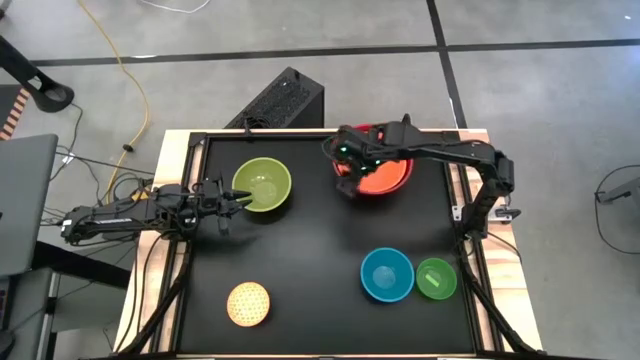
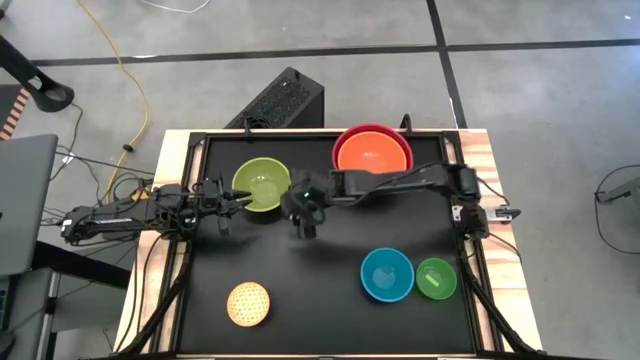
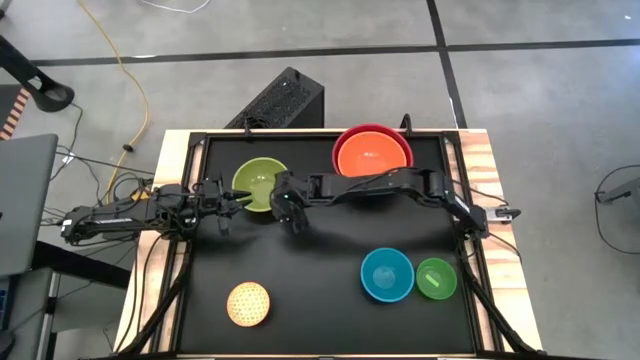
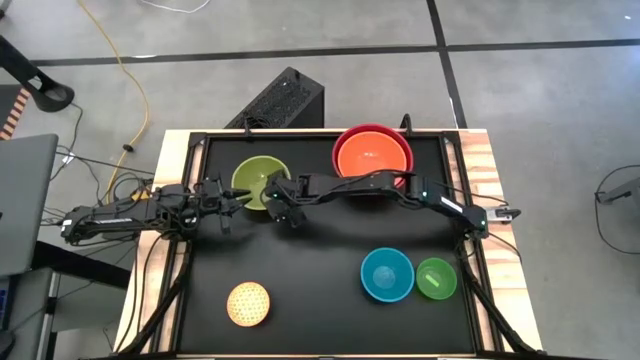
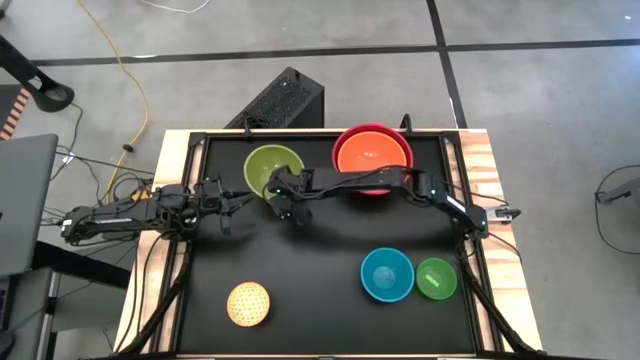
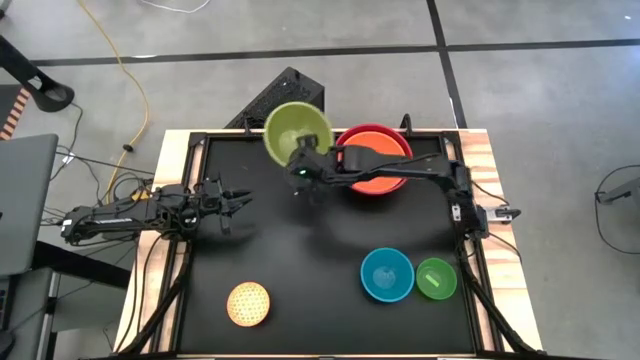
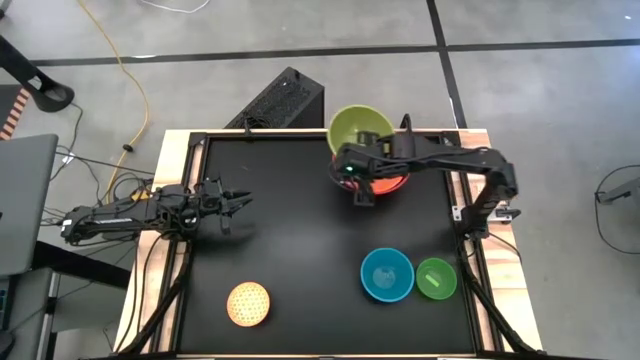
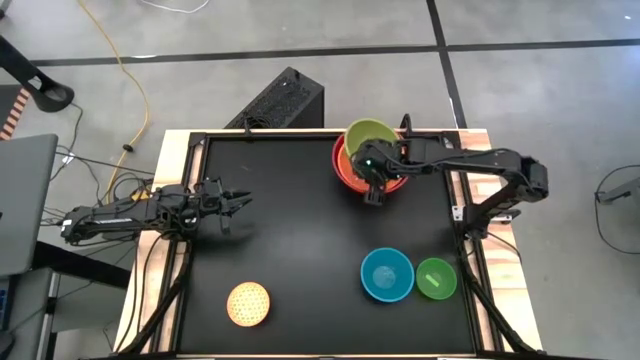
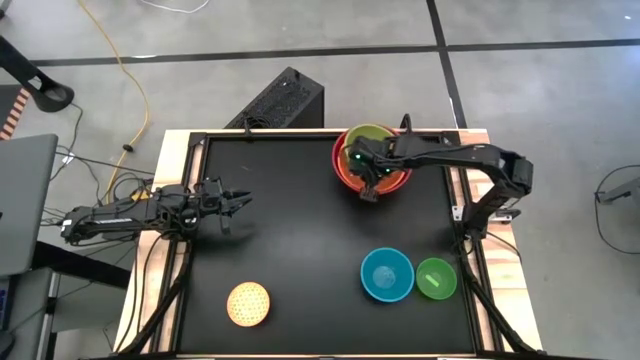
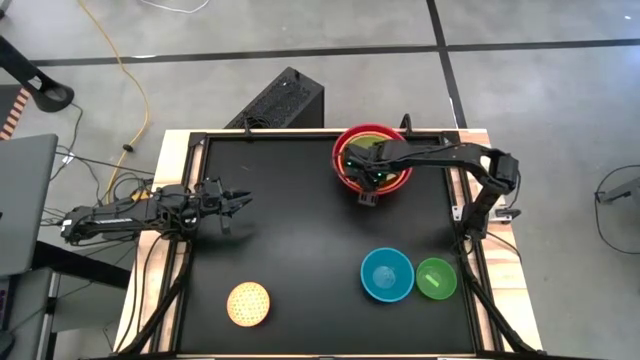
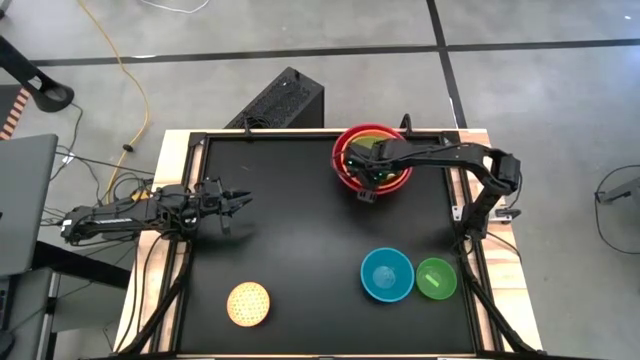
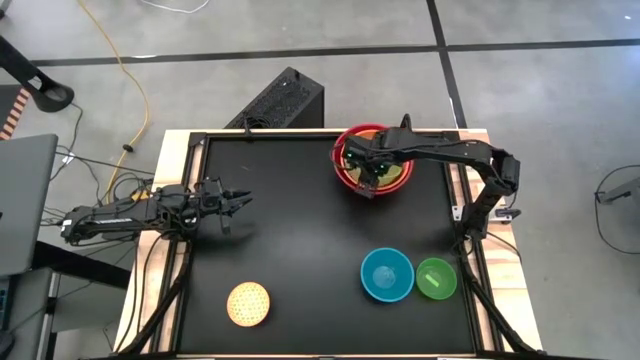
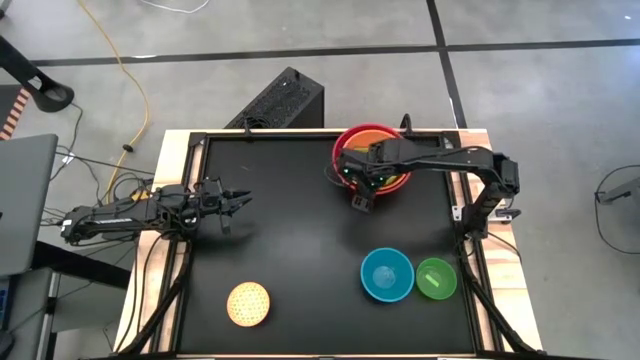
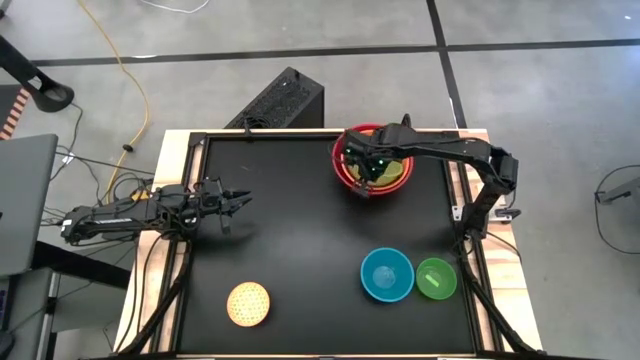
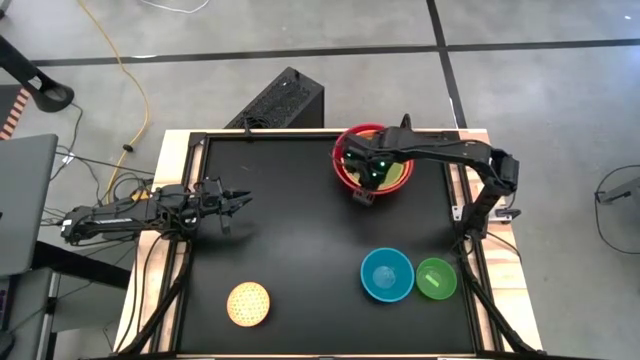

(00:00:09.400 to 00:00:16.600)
Stack the light green bowl on top of the orange bowl

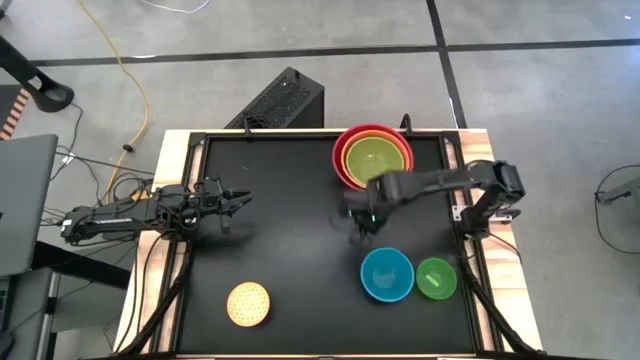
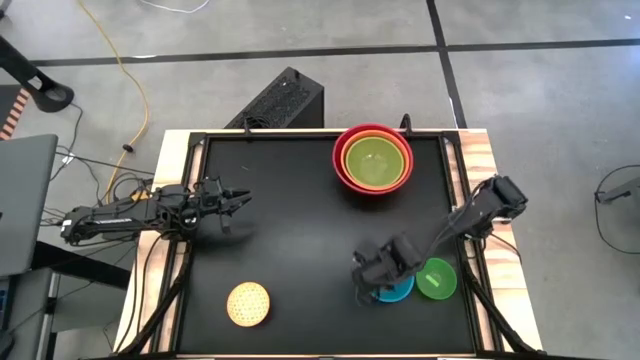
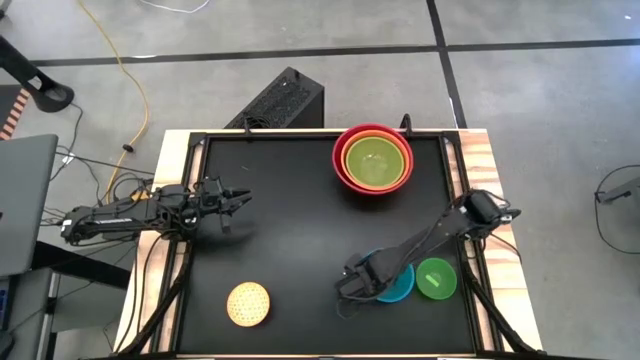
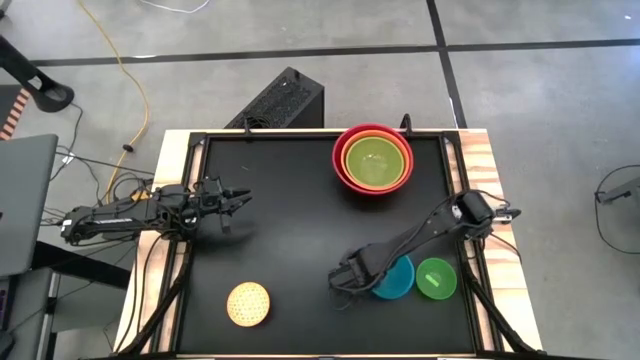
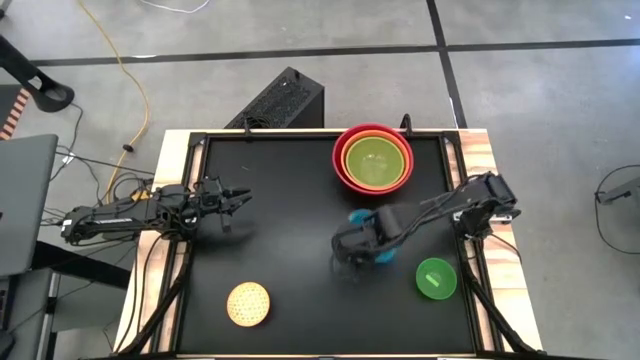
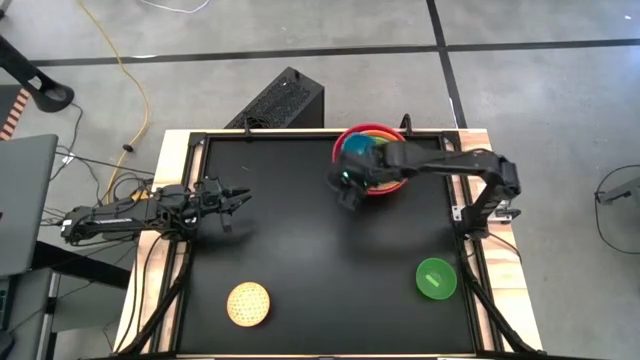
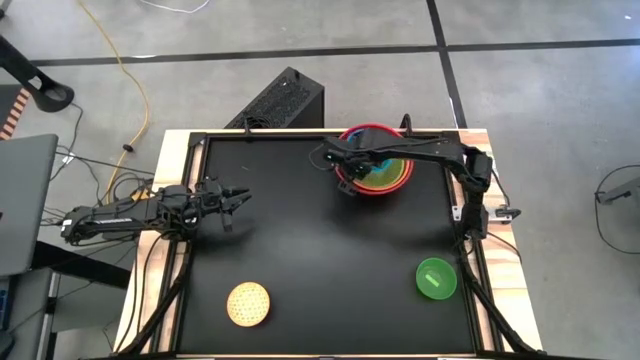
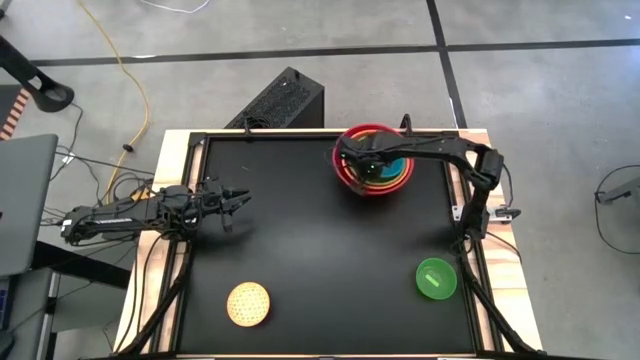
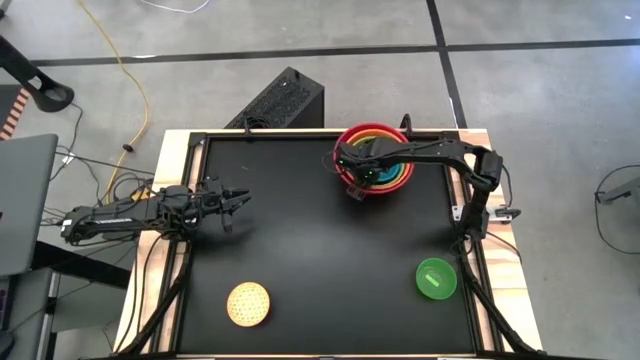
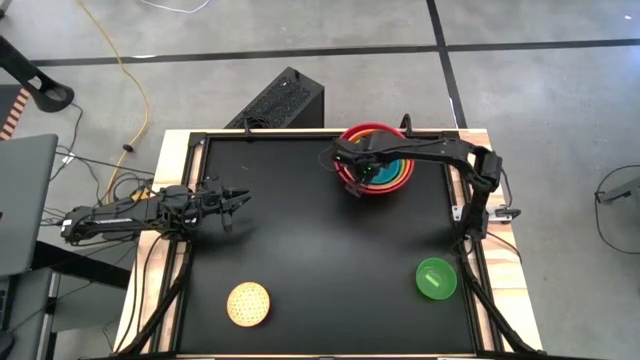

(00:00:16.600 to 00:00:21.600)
Stack the blue bowl on top of the light green bowl

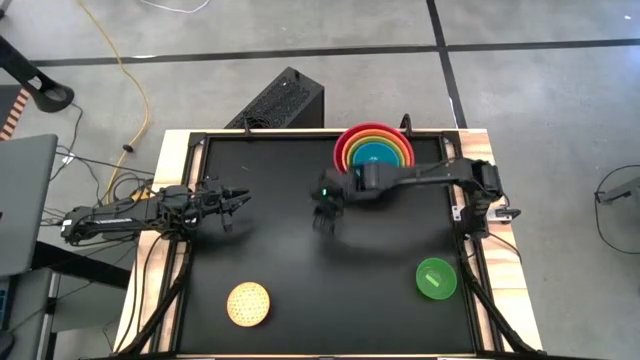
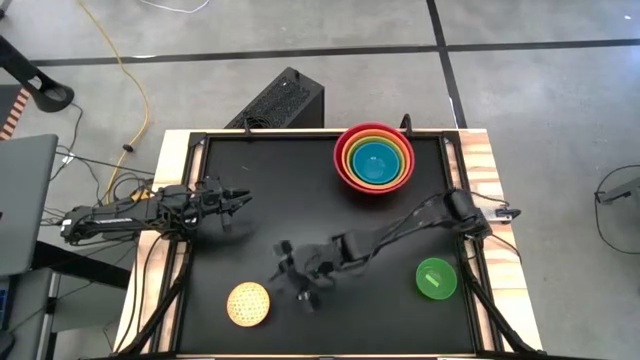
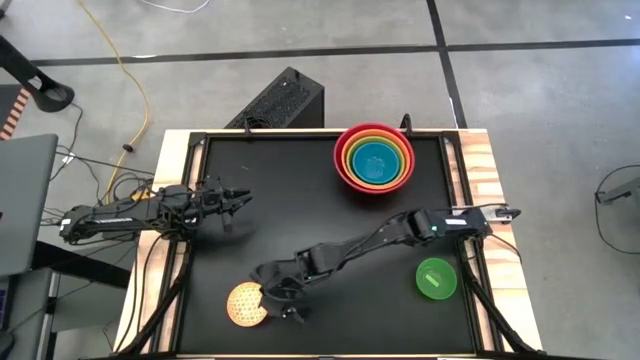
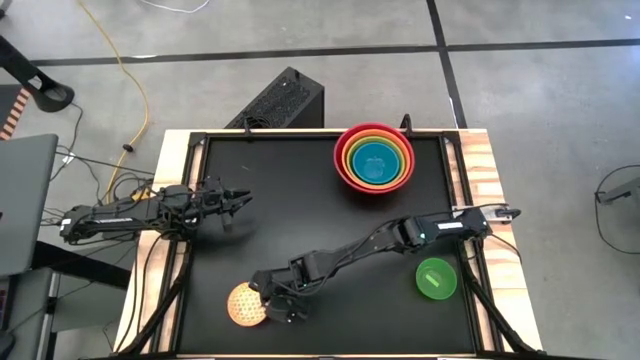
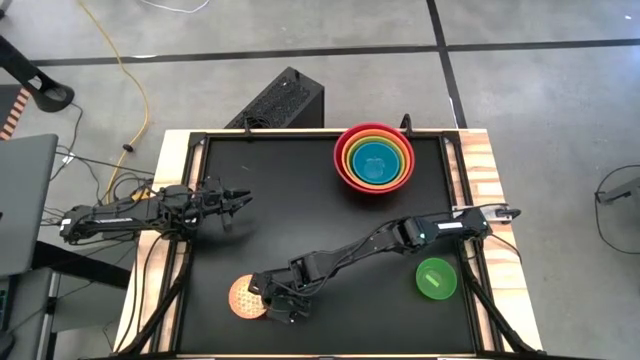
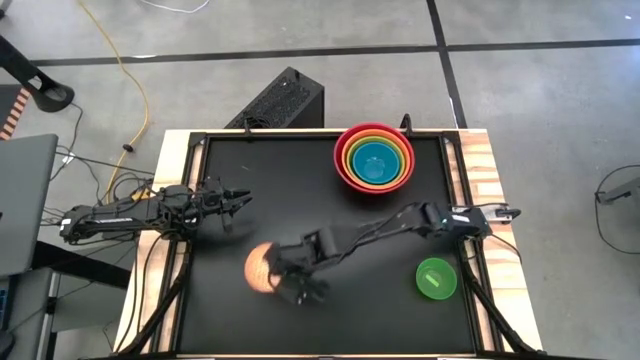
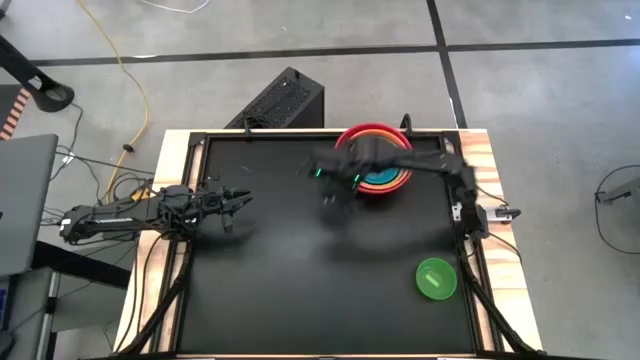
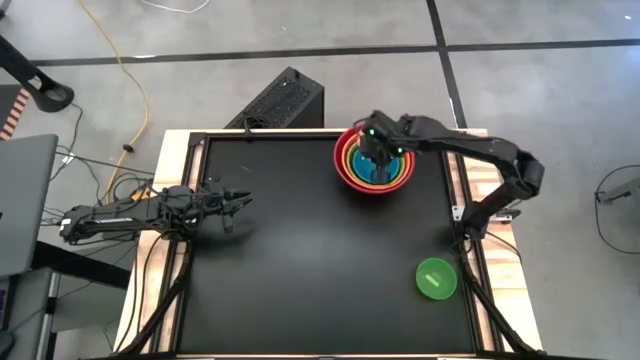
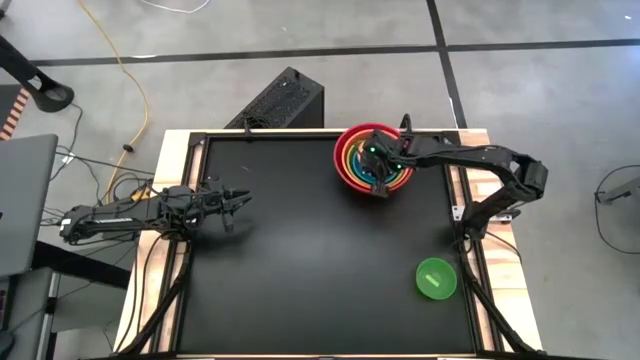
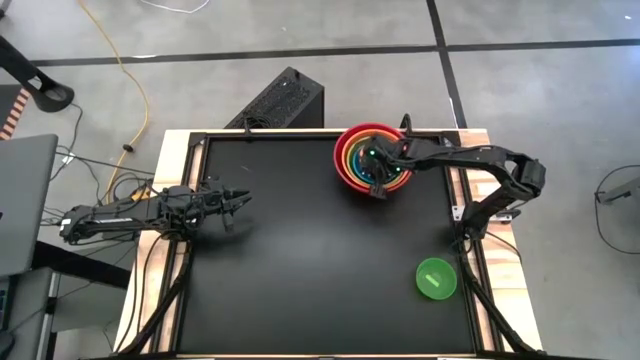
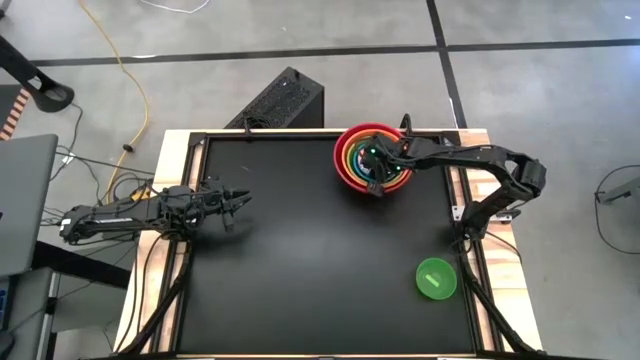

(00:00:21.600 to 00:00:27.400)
Stack the orange and blue bowl on top of the blue bowl

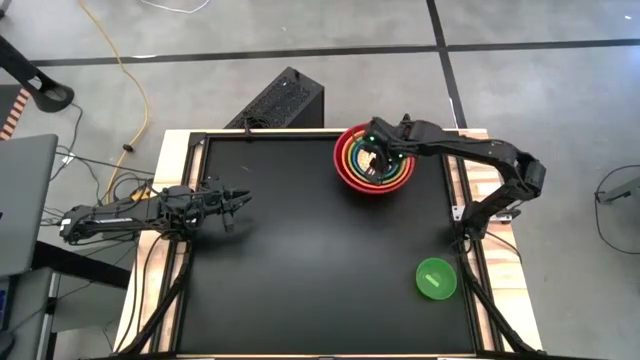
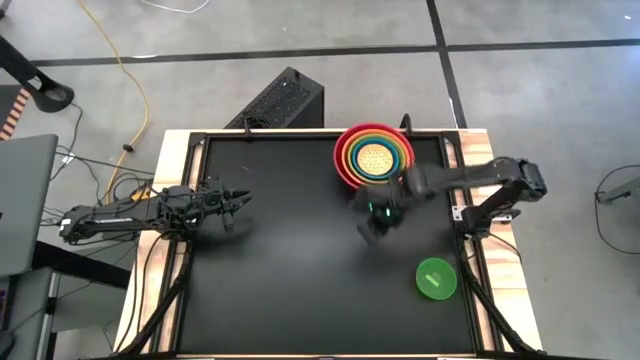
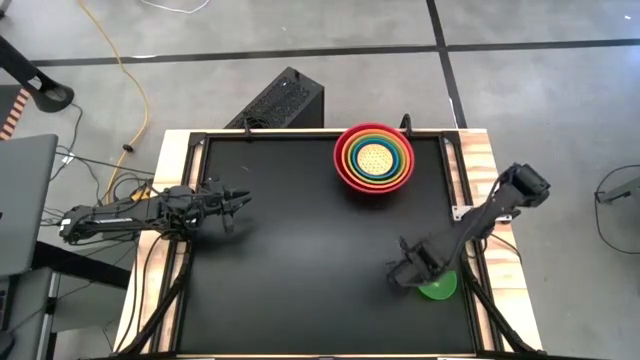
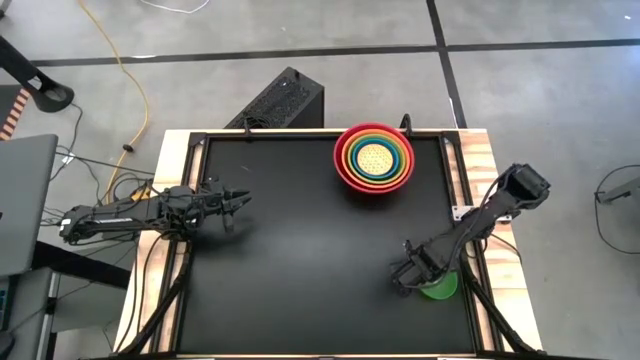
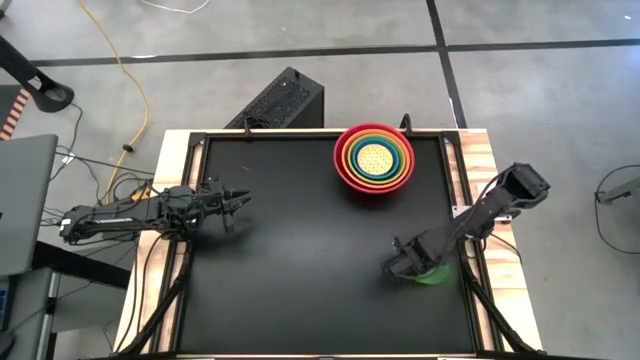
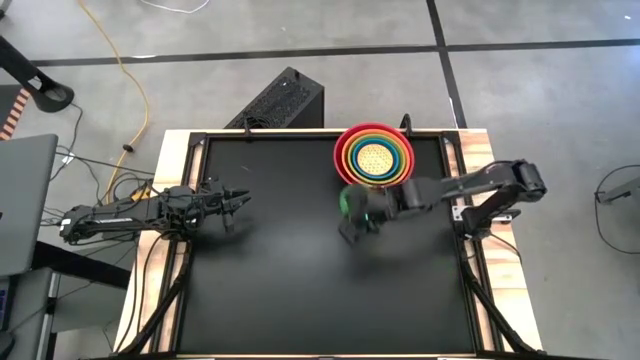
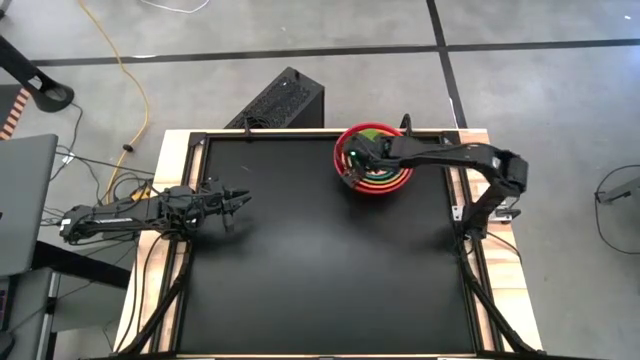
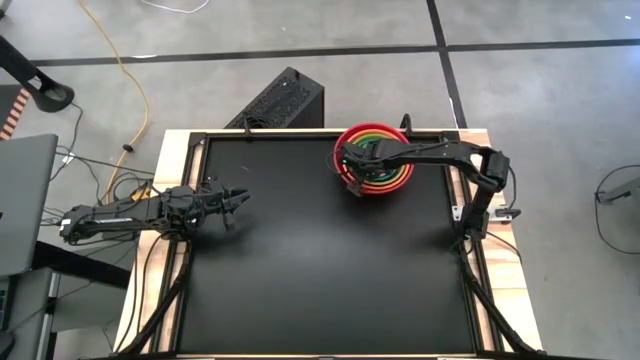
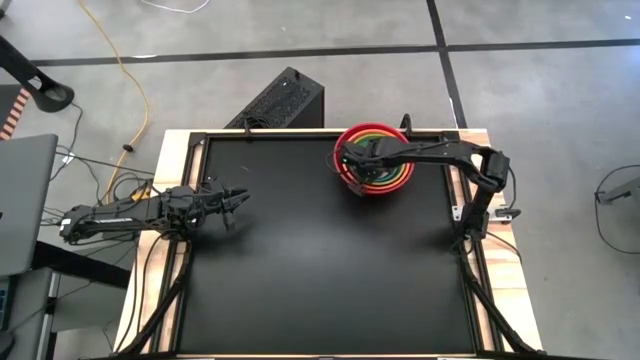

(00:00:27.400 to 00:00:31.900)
Stack the transparent green bowl on top of the orange and blue bowl
